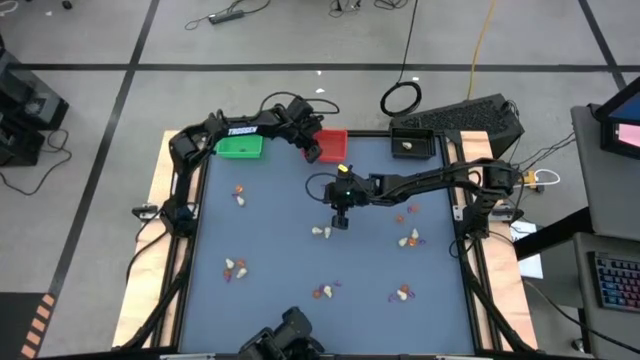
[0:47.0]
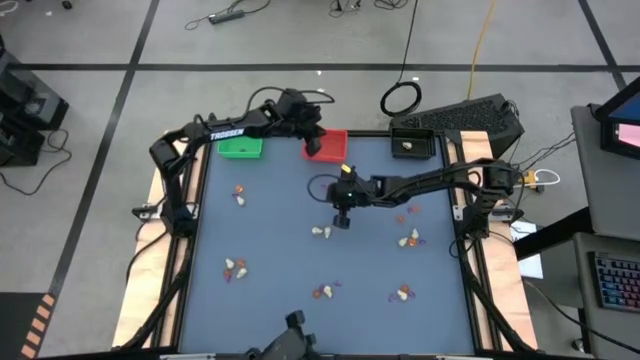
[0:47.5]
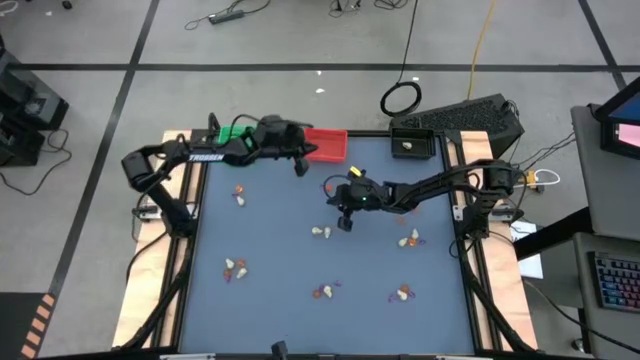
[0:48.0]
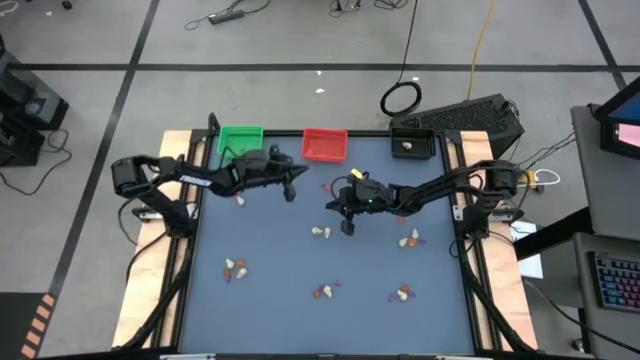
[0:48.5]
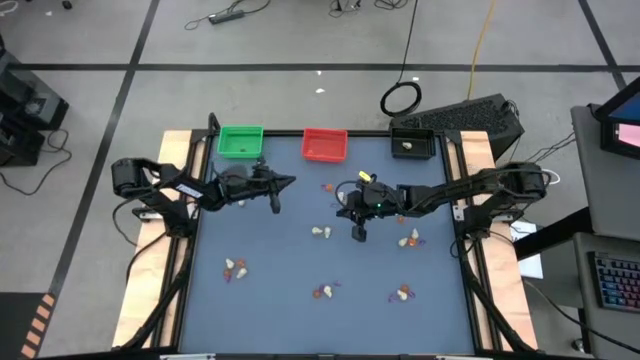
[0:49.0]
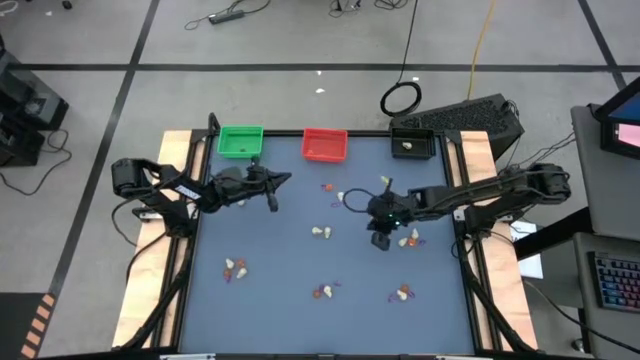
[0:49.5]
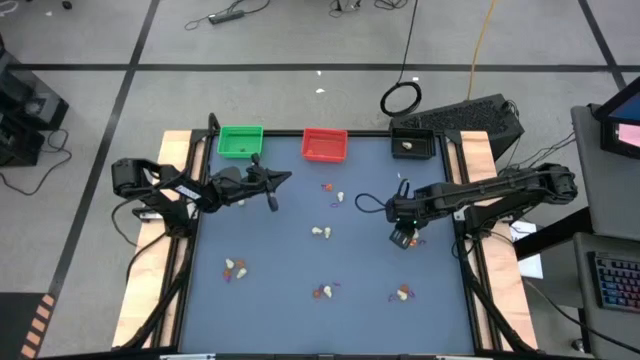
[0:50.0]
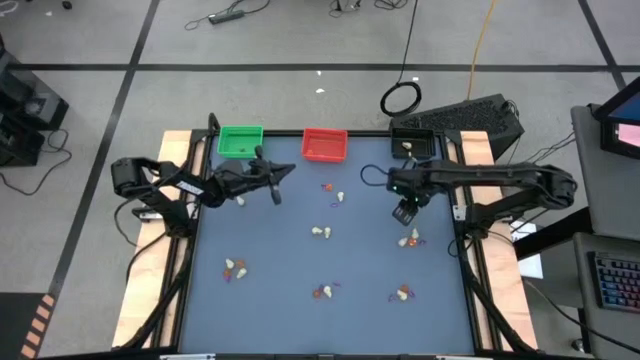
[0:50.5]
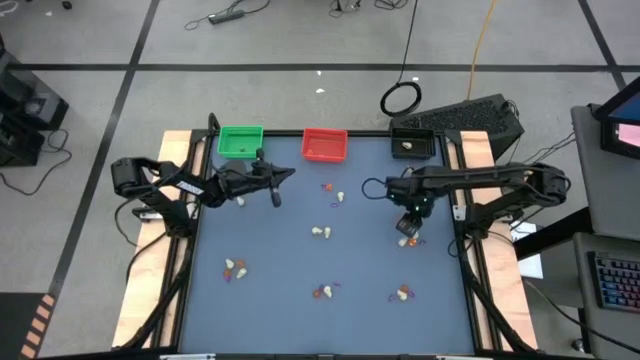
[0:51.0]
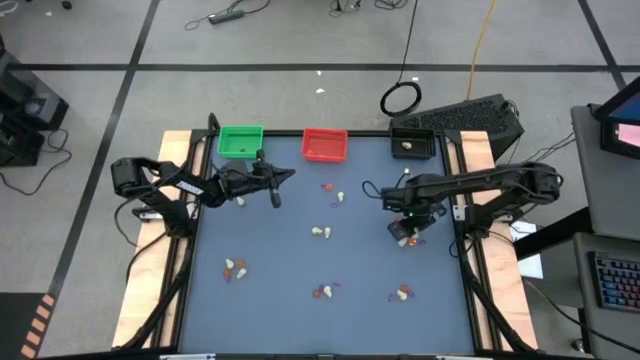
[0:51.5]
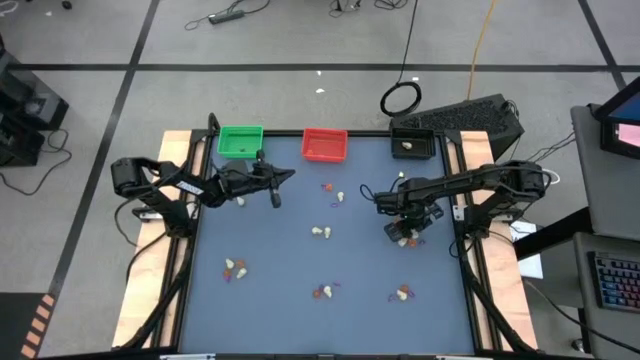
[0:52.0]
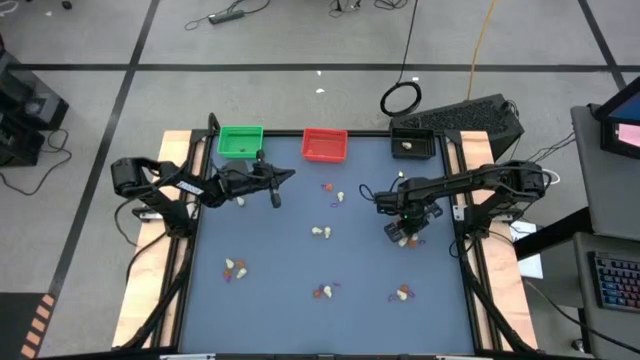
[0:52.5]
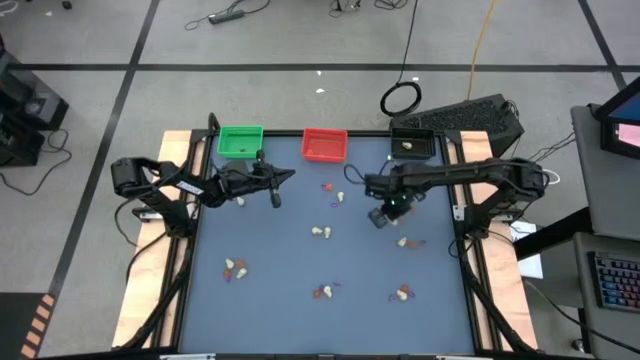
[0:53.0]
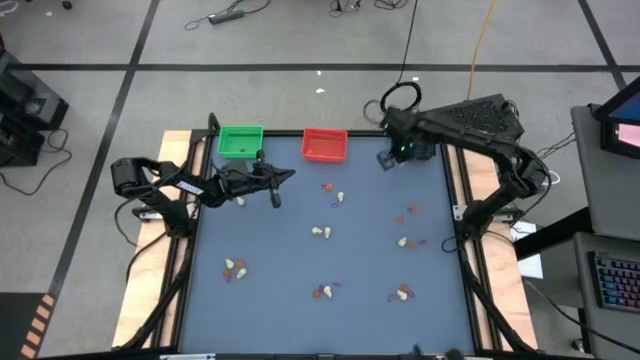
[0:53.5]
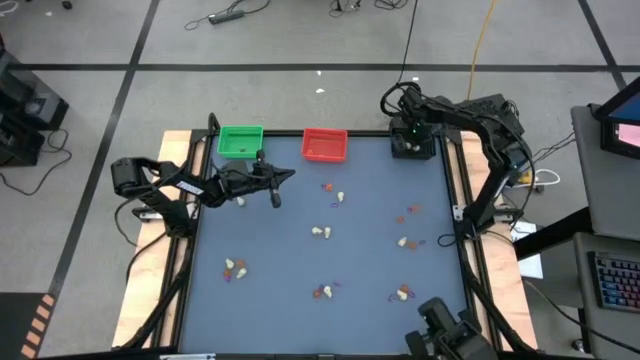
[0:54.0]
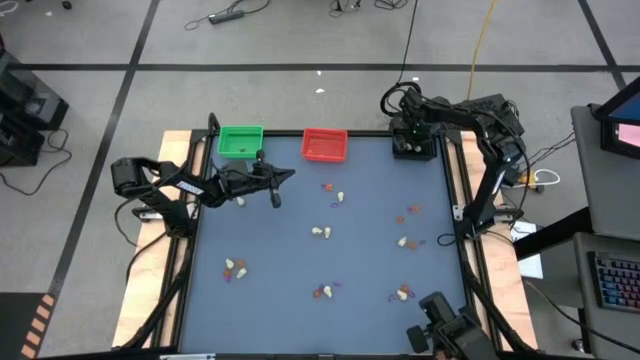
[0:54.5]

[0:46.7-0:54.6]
Task: Sort Halloween decoration
Put the white skull toy into the black bin

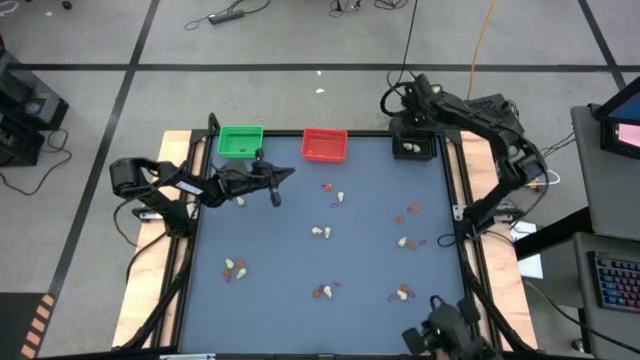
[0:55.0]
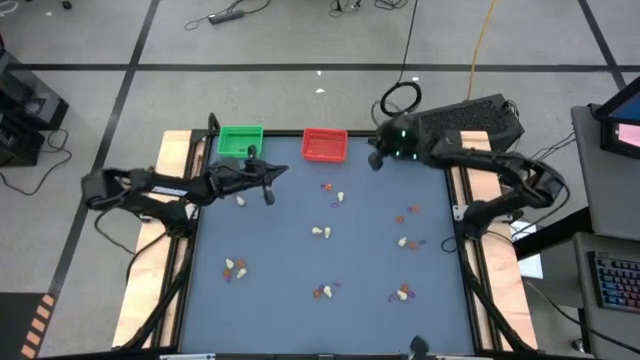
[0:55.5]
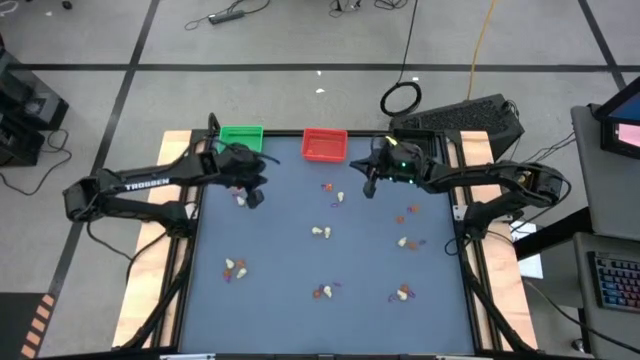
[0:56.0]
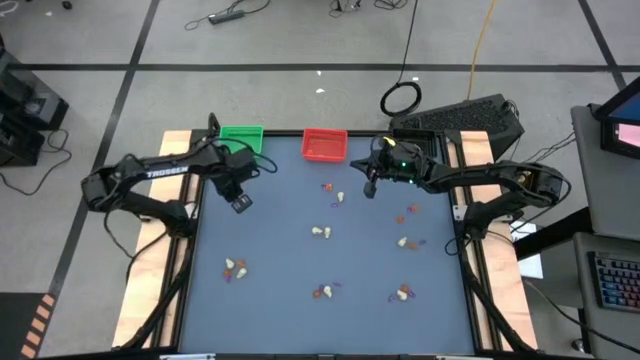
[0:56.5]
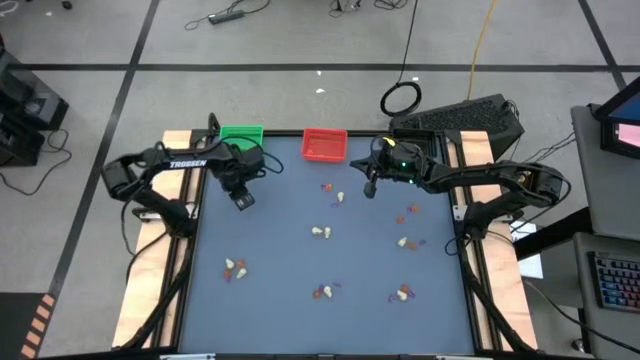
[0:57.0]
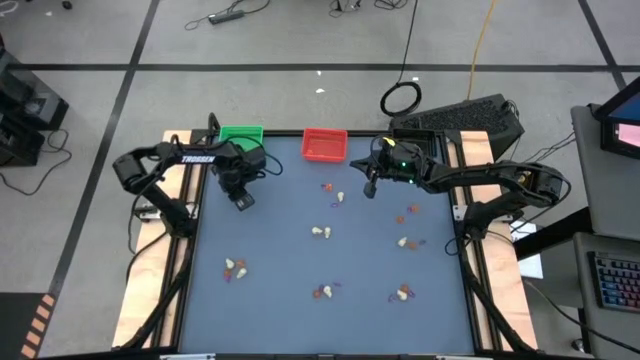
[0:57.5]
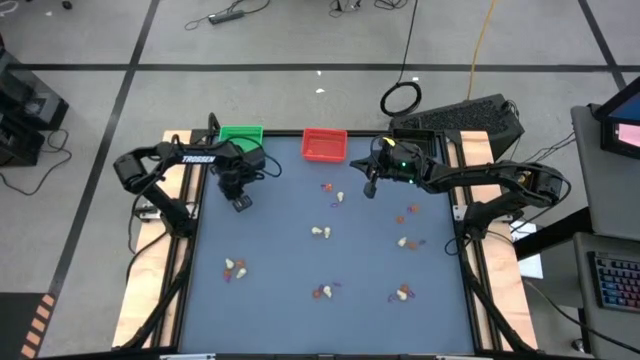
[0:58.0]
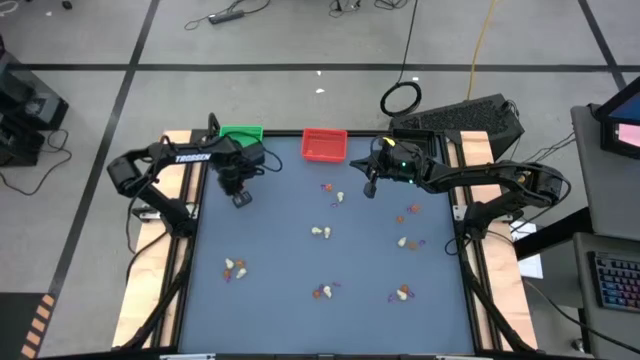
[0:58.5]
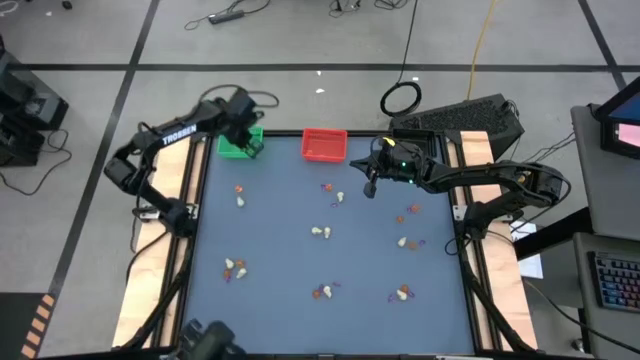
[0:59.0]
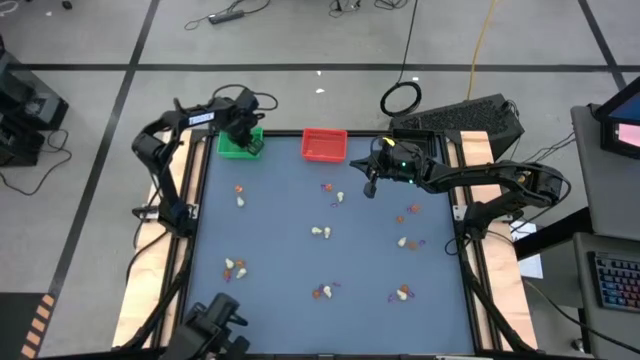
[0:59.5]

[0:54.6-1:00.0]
Put the purple witch hat toy into the green bin

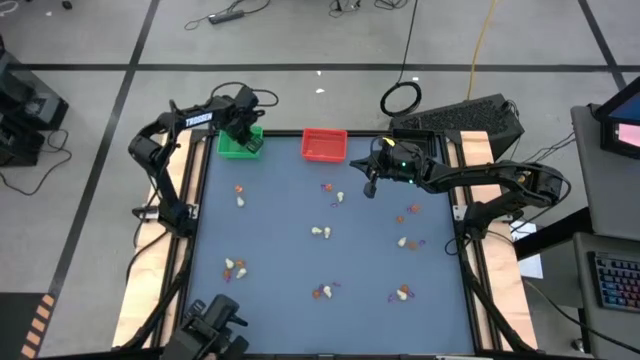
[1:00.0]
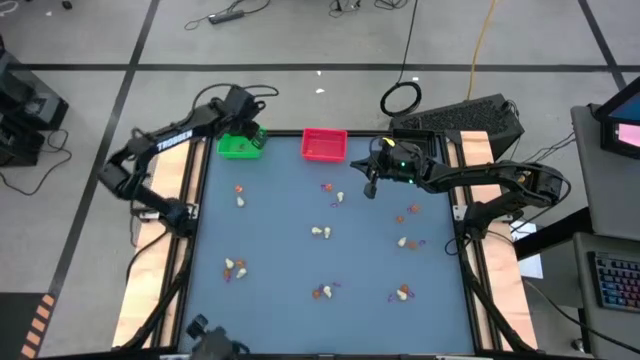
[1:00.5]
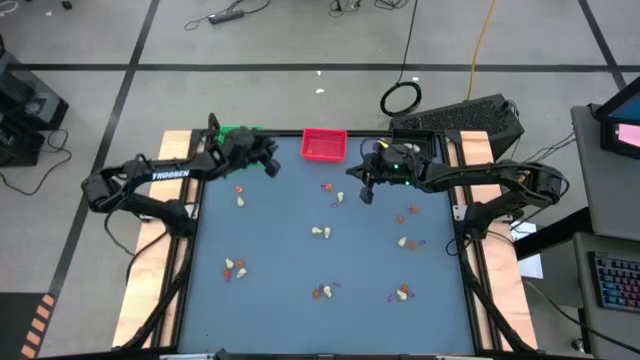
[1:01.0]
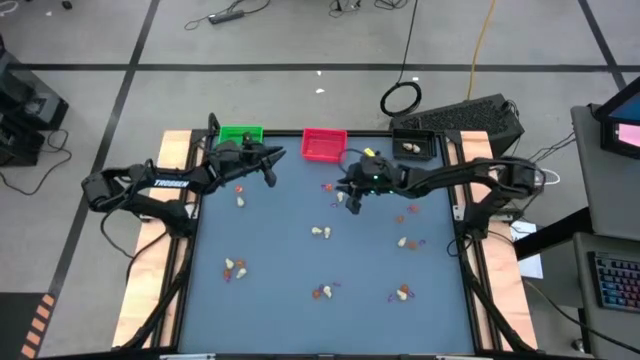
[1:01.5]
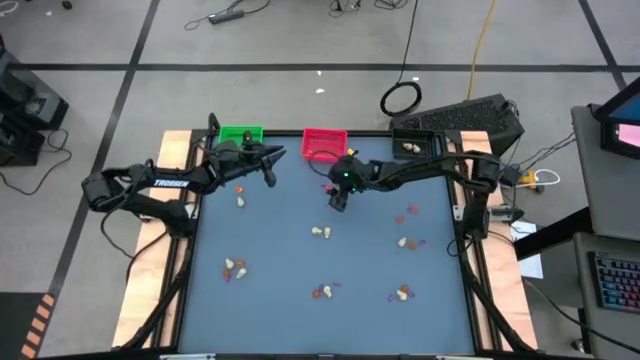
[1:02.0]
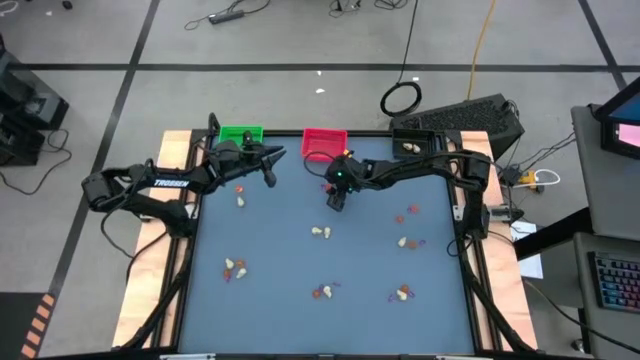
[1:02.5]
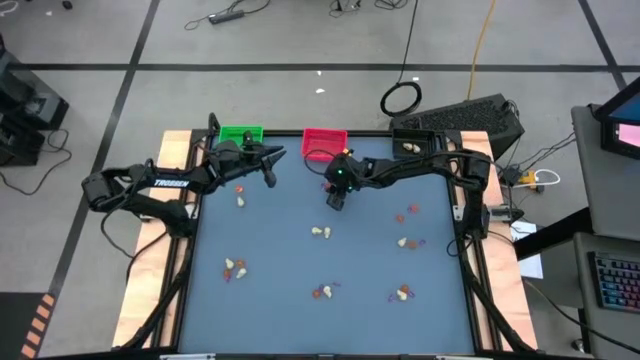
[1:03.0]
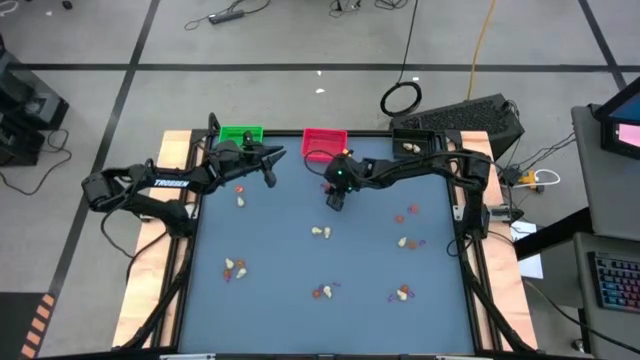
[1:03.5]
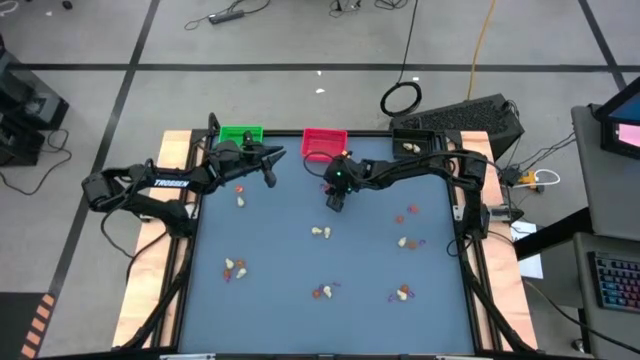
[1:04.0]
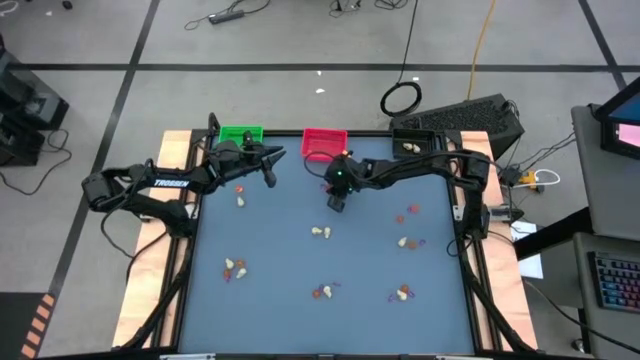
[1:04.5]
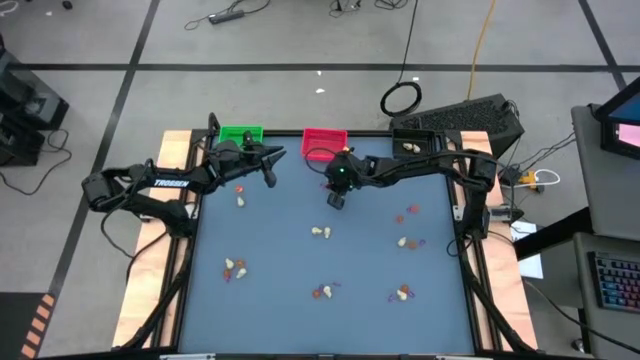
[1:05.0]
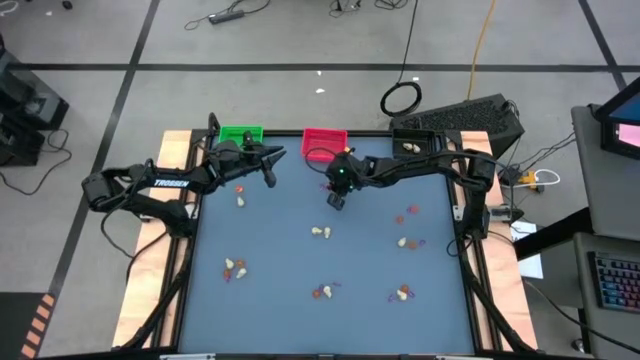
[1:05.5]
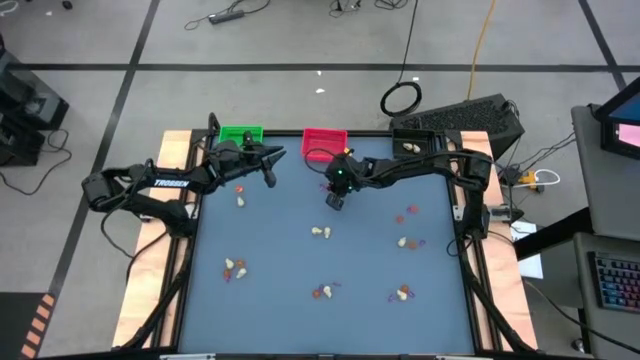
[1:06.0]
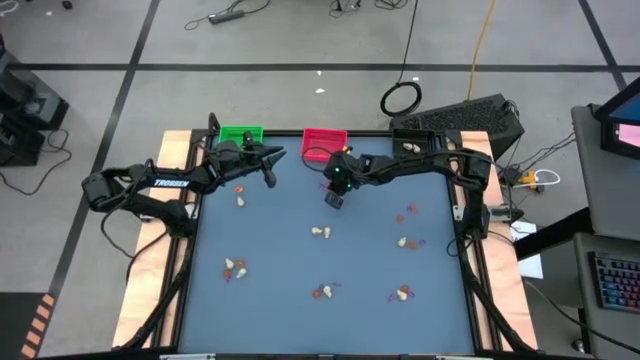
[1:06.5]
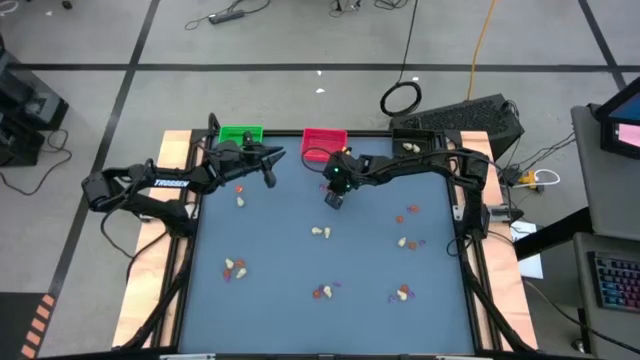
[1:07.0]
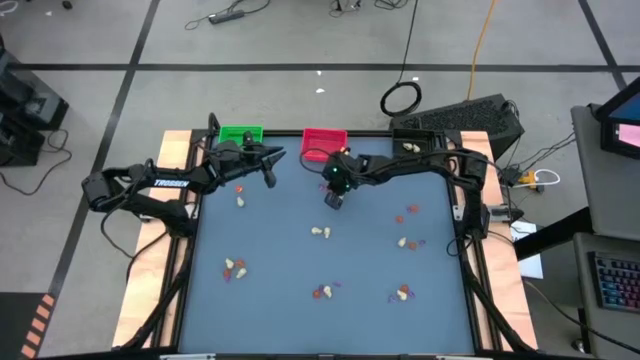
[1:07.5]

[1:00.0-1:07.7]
Put the orange pumpkin toy into the red bin

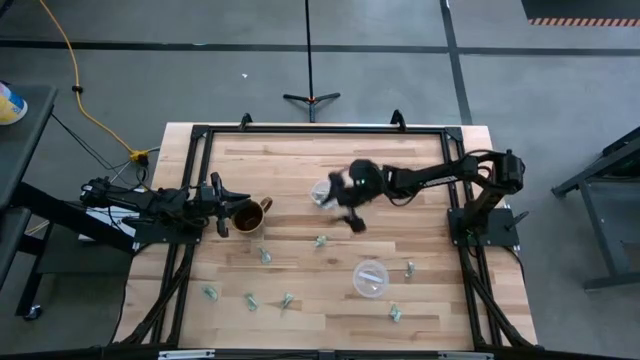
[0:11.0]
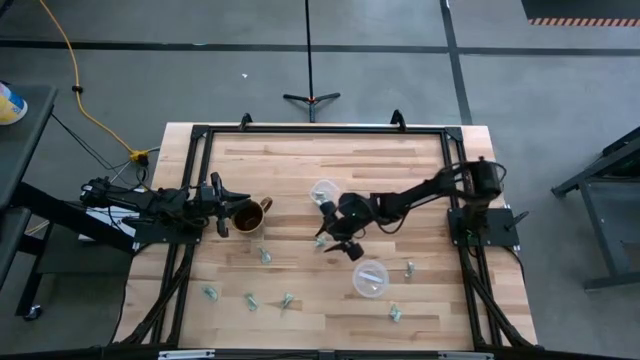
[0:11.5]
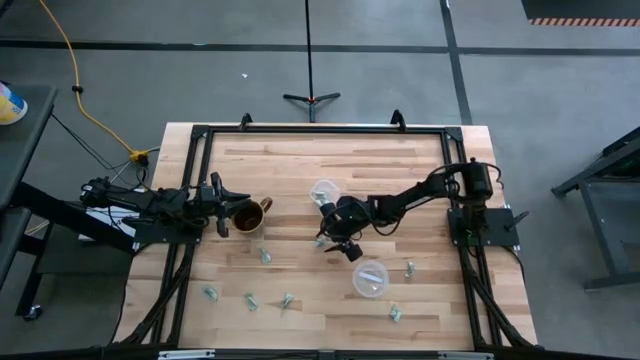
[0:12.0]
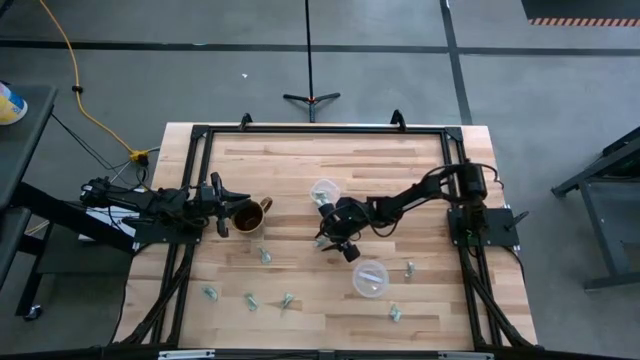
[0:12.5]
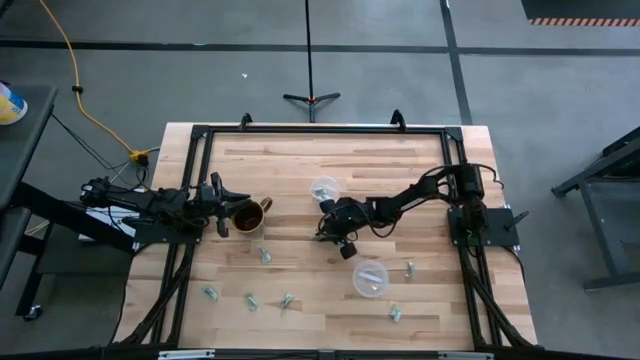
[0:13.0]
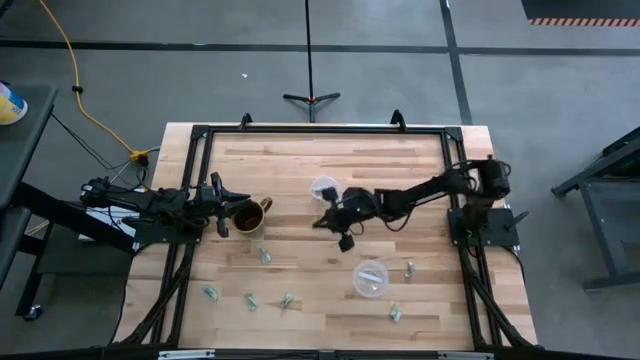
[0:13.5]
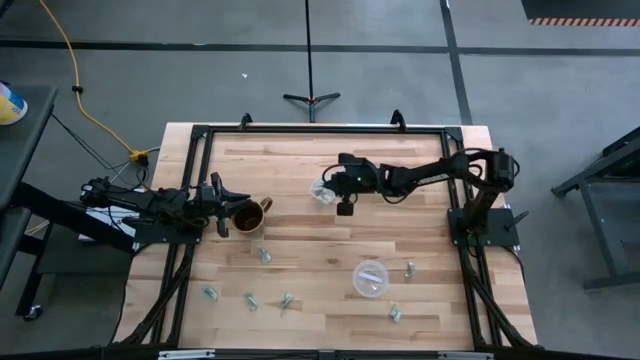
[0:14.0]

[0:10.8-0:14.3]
Task: Pick and place Stevia / Truvia into bins
Put the stevia packet into the top transparent container
